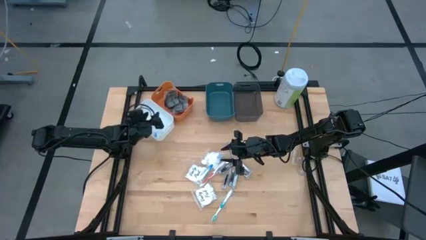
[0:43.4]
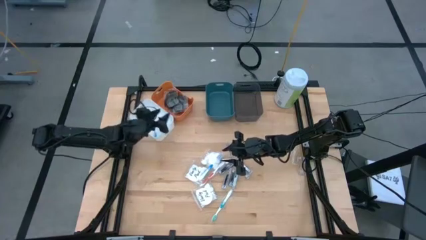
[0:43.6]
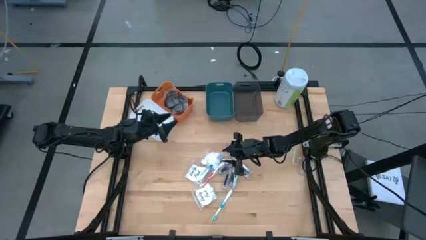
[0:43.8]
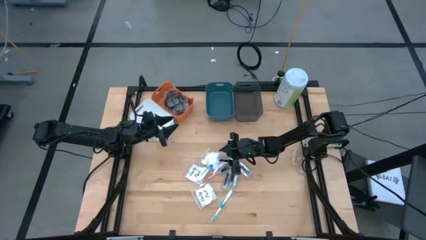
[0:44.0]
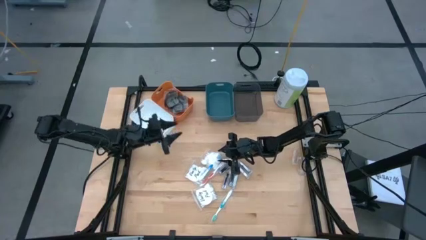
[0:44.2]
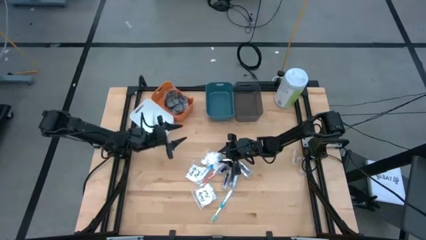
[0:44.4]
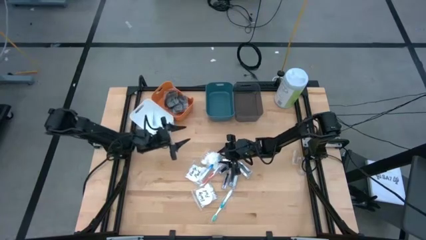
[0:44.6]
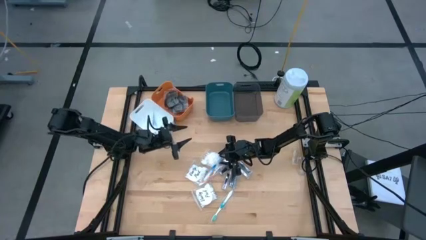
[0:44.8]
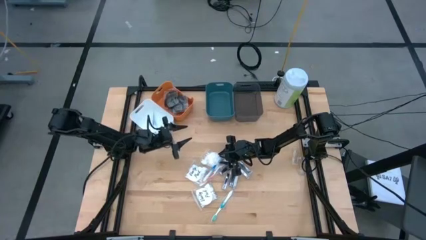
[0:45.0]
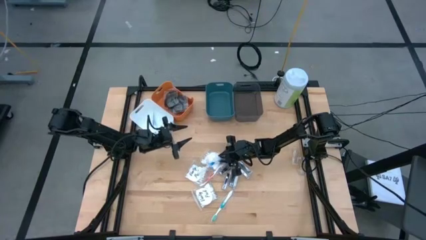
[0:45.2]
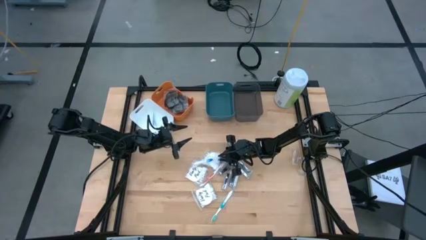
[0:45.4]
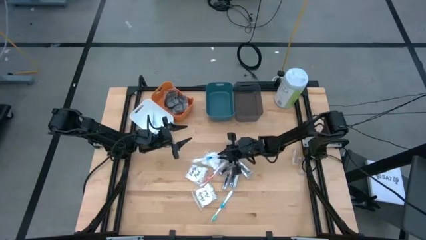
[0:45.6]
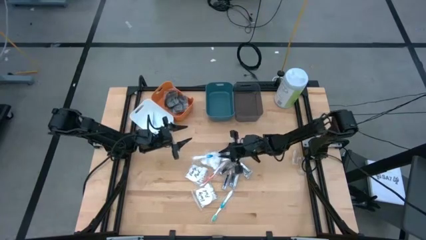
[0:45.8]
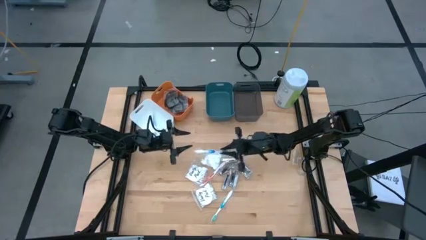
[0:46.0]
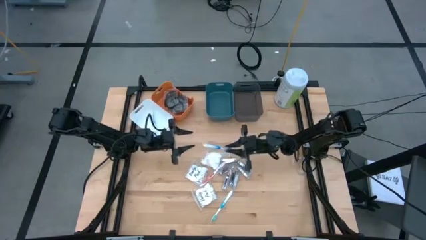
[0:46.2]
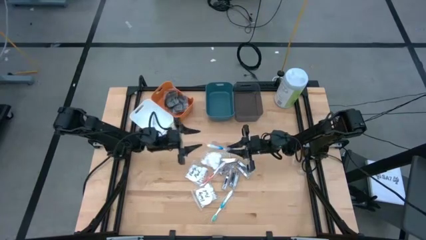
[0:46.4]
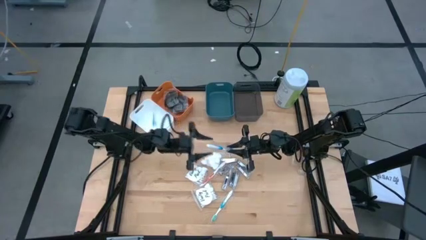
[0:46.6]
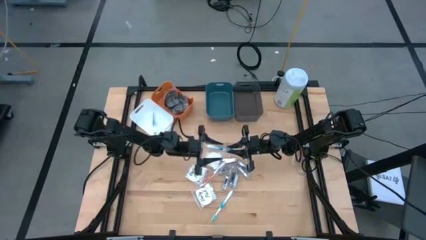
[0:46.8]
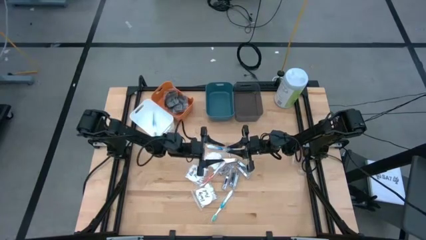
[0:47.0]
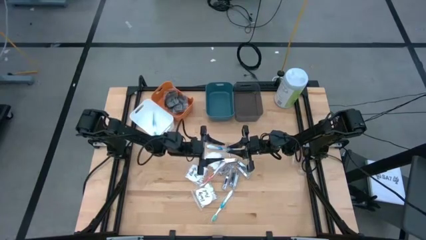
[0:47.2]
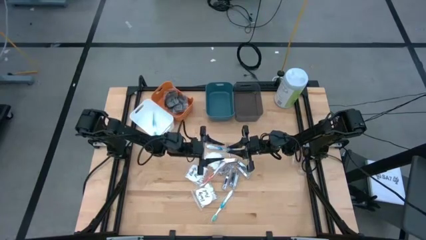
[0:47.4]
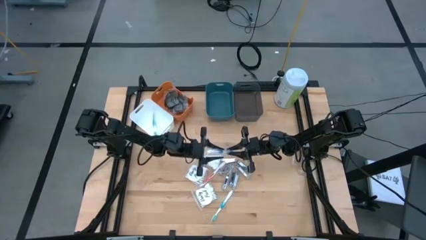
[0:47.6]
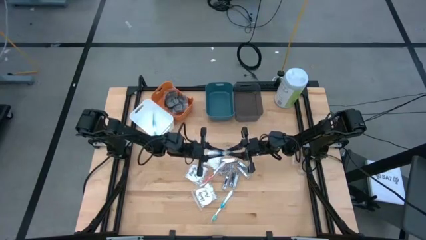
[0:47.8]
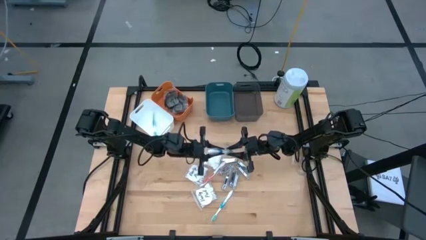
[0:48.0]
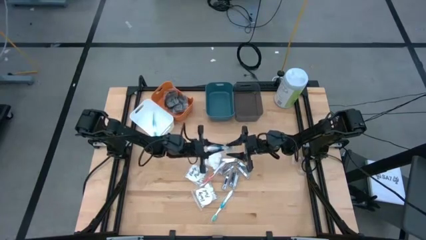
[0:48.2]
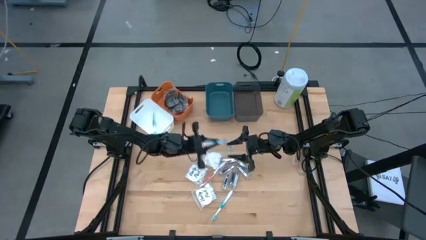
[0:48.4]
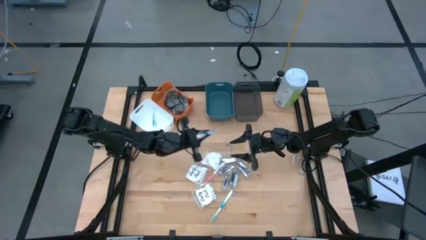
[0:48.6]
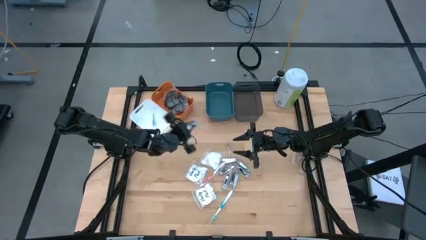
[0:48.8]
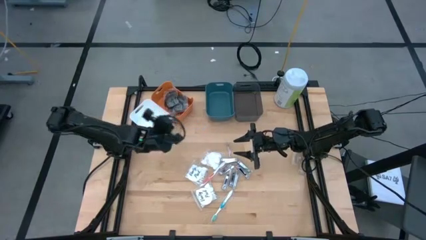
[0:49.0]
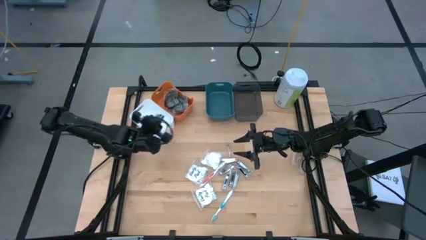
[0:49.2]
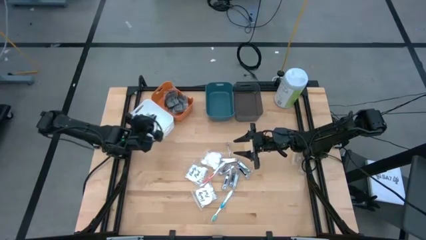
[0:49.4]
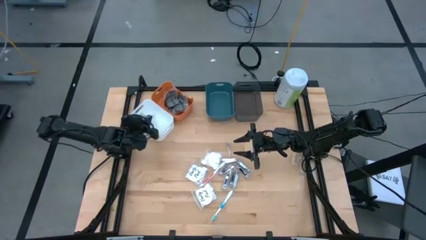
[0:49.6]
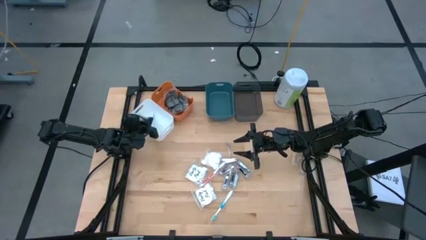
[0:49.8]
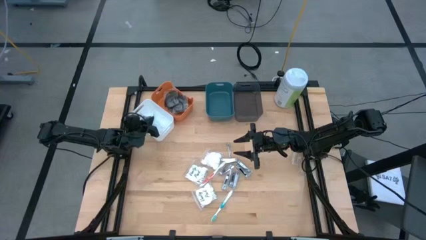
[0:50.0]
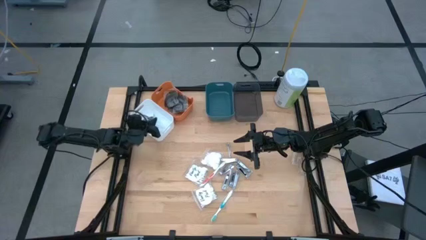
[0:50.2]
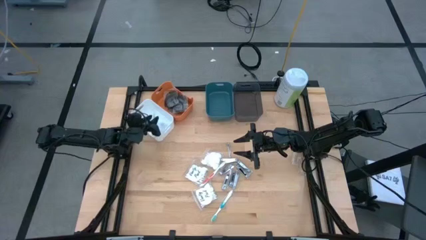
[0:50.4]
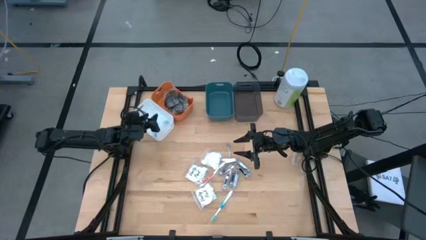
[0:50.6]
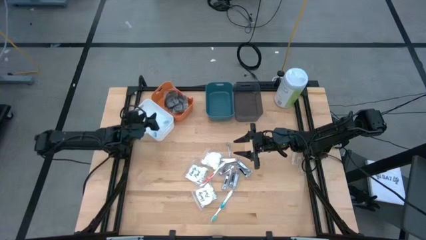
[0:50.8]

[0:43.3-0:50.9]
Task: Pick & Place Travel size toiletries
Put the blue toothbrush into the white bin

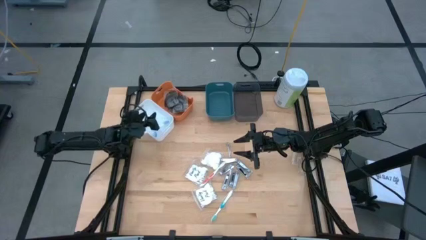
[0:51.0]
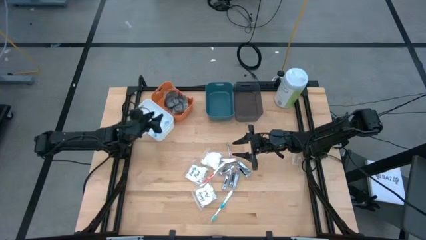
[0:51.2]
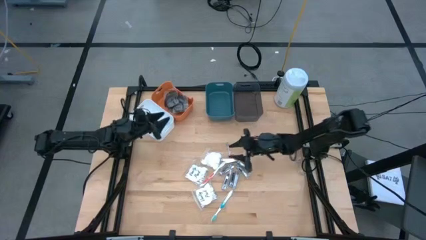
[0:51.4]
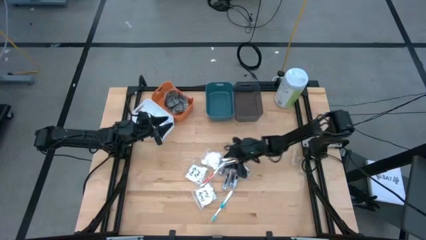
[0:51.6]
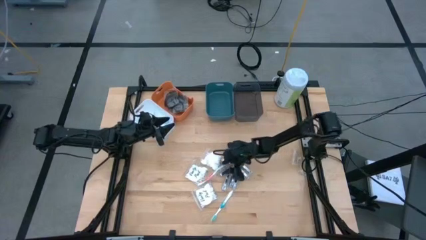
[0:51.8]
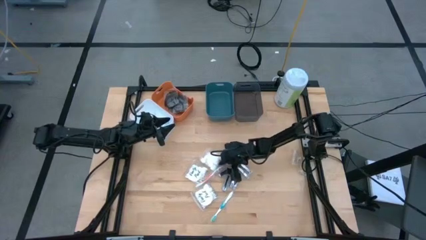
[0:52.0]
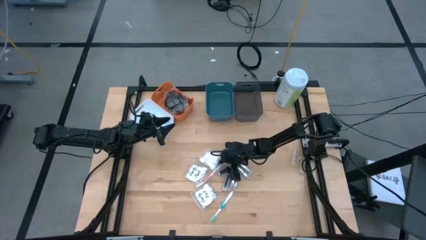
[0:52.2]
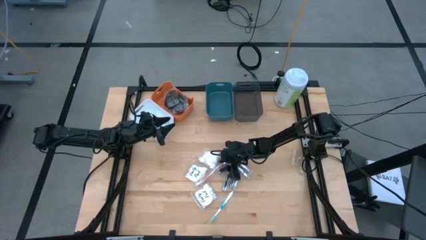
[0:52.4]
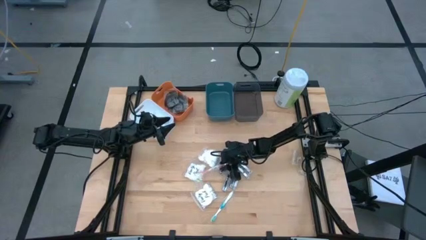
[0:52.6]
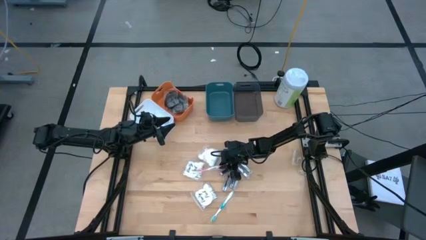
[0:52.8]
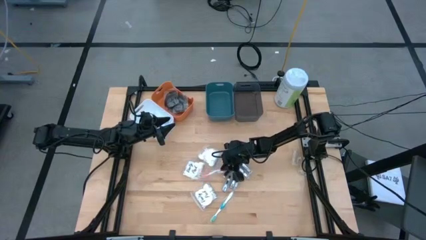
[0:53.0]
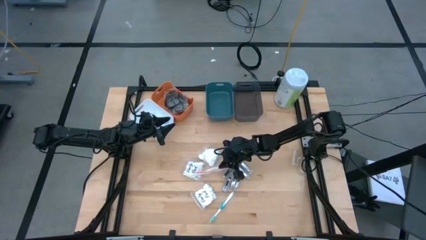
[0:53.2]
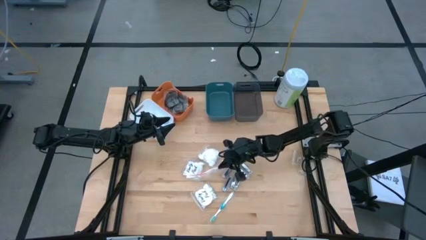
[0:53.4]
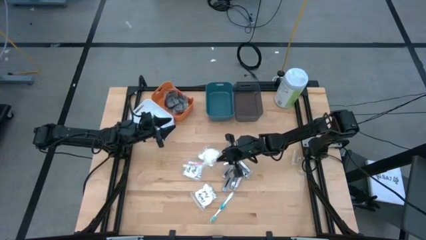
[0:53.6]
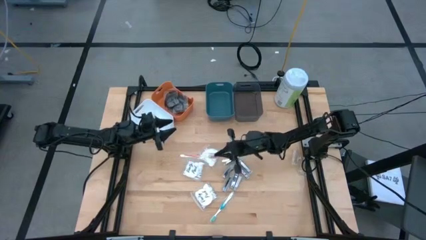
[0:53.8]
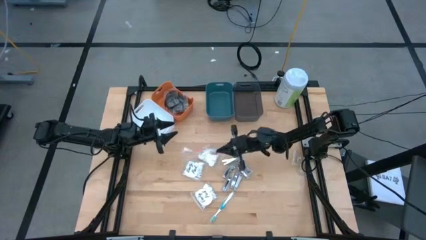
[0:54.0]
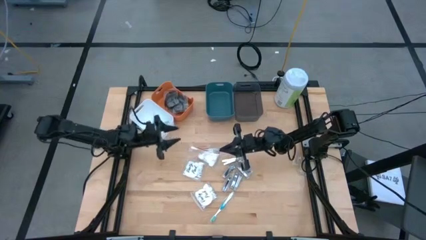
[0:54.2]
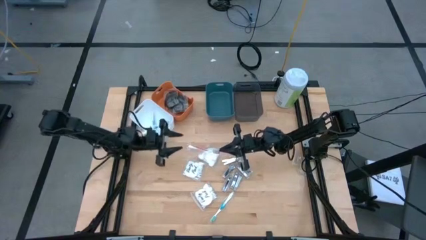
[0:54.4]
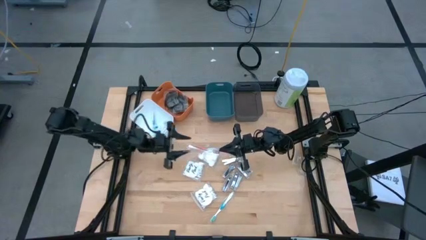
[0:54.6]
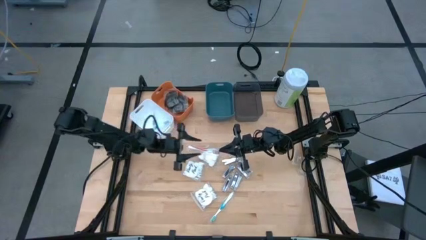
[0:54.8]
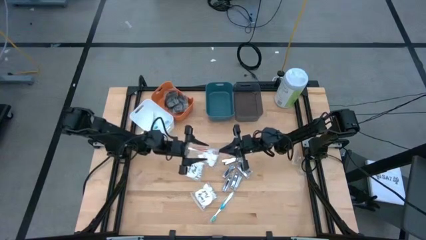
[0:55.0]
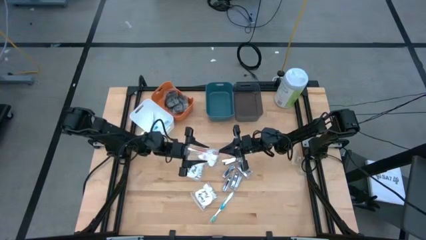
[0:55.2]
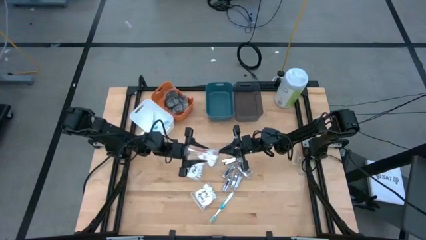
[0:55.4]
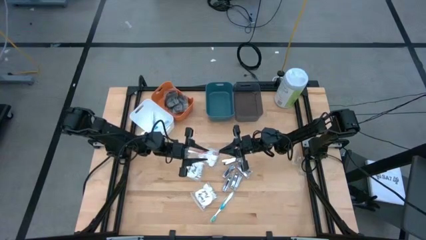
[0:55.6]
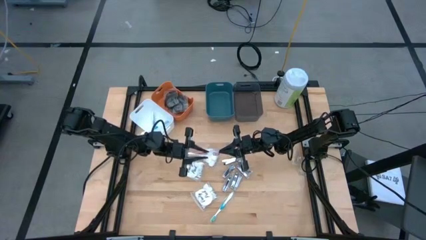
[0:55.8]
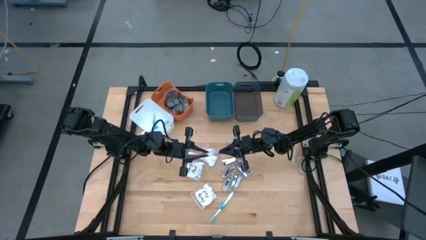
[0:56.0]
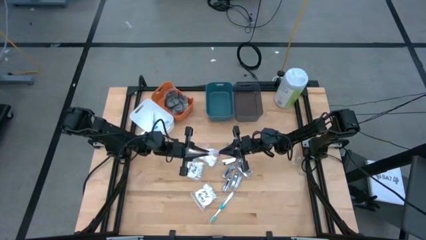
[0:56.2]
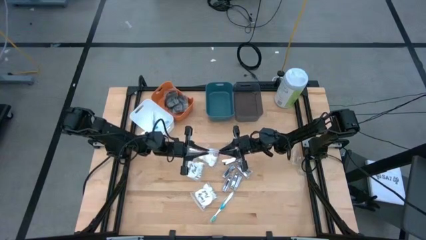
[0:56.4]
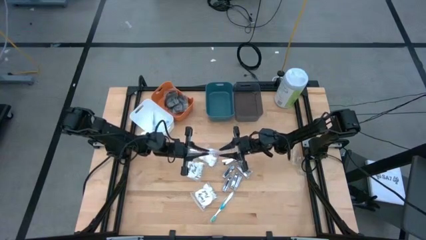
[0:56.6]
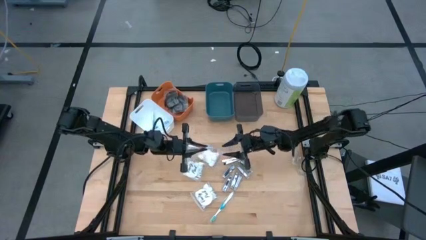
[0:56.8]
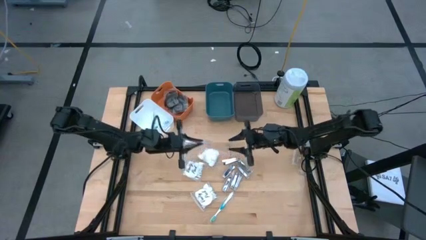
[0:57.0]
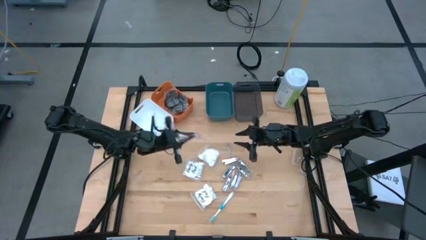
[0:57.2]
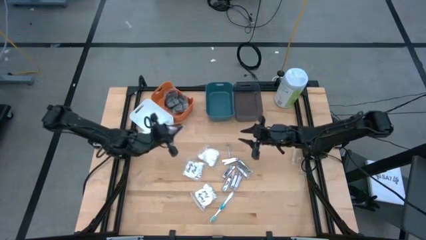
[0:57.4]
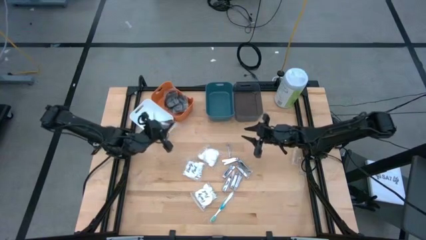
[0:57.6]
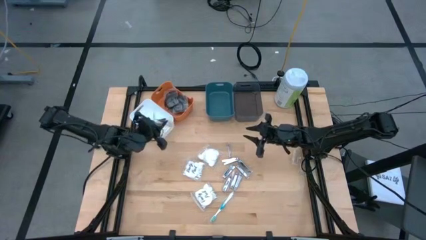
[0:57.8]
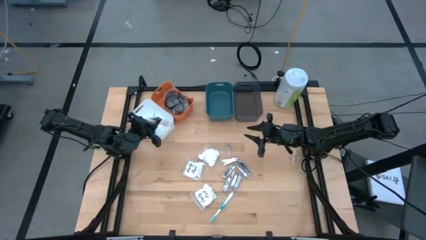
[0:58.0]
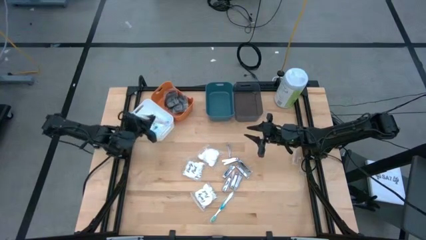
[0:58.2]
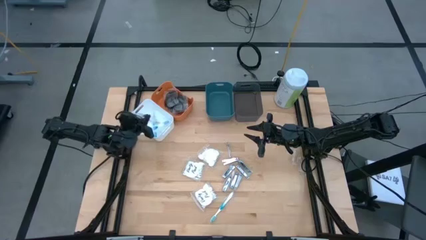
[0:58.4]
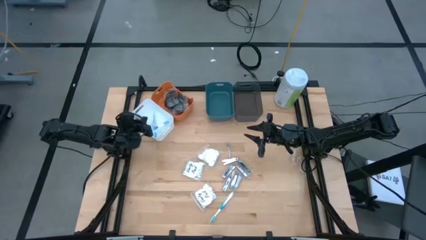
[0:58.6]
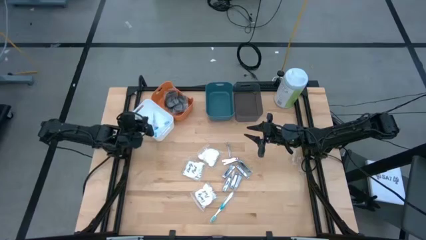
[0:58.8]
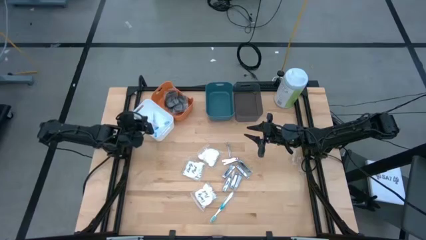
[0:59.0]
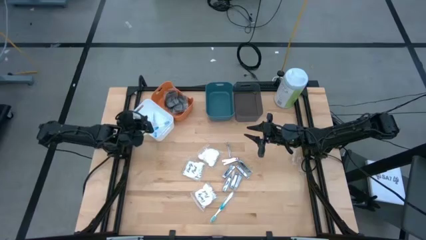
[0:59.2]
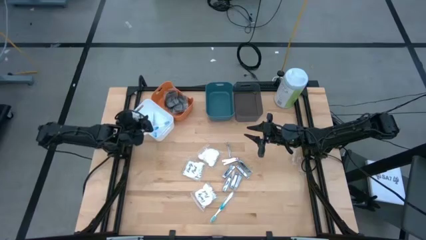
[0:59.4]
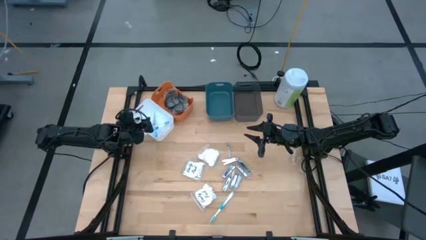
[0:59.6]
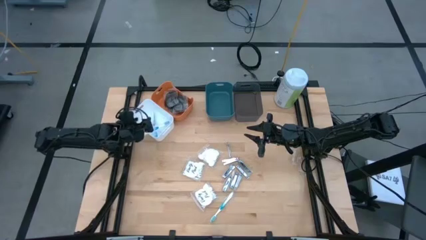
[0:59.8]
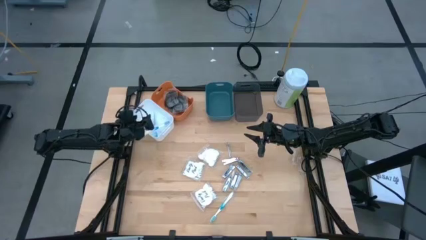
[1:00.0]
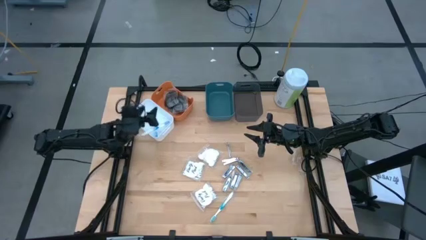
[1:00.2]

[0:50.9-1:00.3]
Put the orange toothbrush into the white bin
